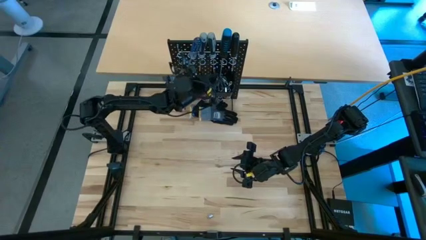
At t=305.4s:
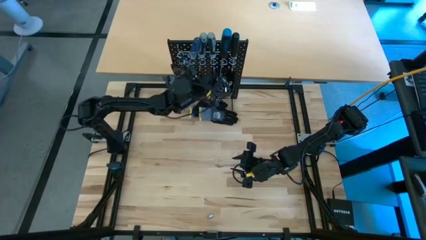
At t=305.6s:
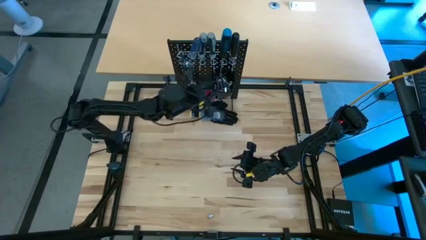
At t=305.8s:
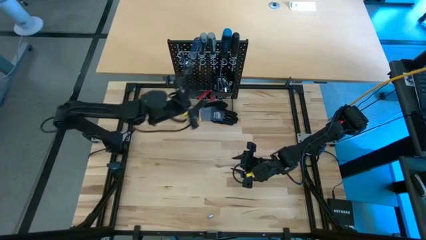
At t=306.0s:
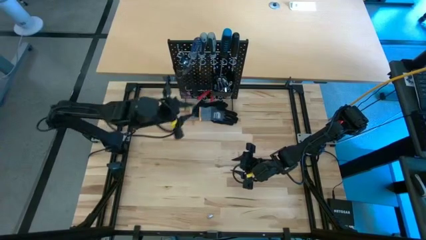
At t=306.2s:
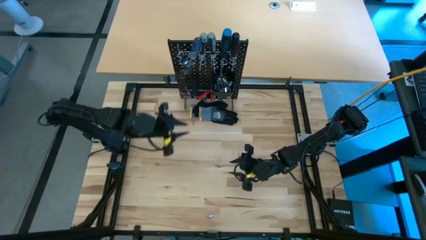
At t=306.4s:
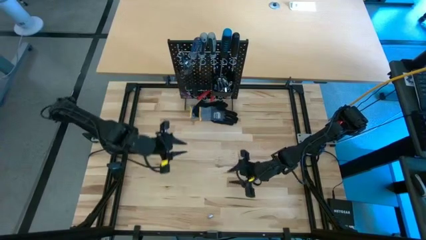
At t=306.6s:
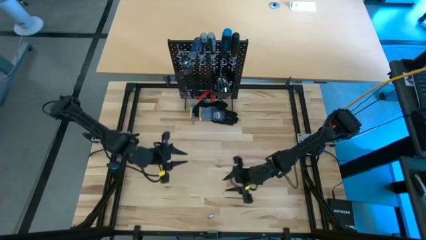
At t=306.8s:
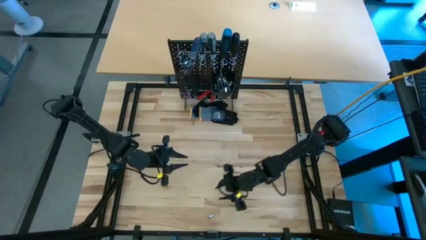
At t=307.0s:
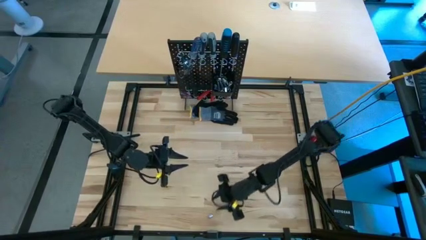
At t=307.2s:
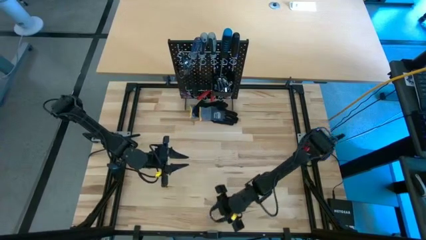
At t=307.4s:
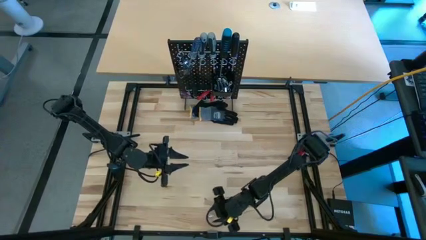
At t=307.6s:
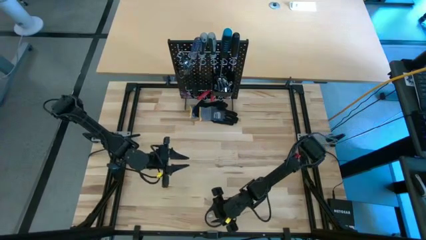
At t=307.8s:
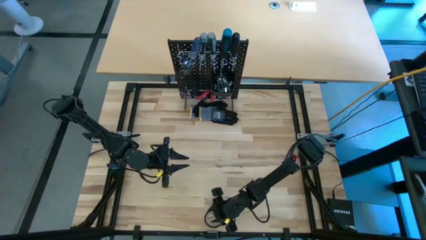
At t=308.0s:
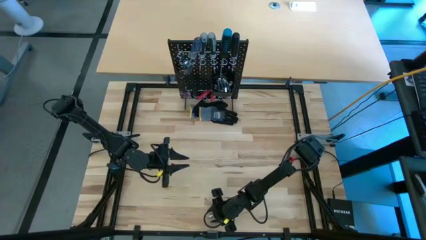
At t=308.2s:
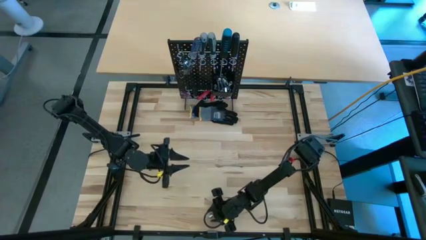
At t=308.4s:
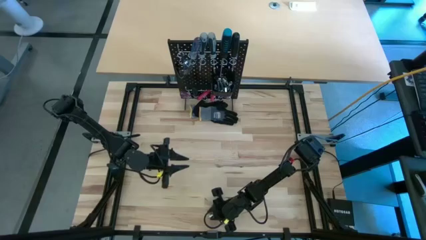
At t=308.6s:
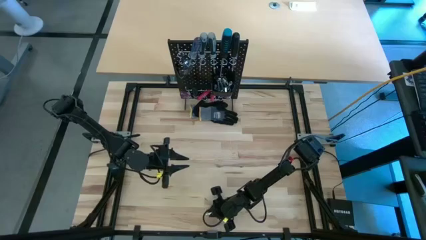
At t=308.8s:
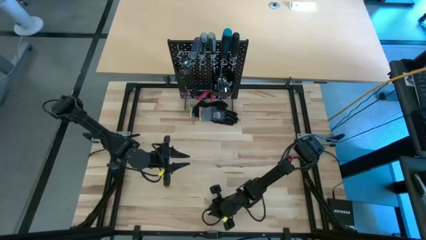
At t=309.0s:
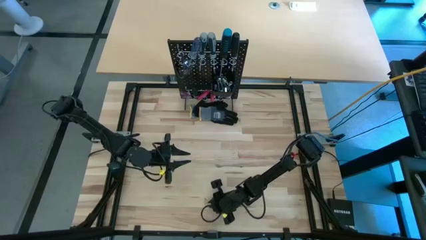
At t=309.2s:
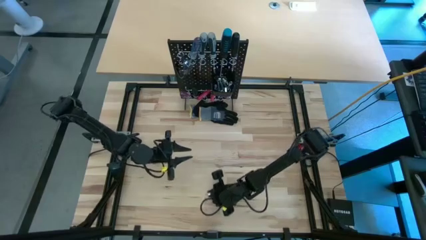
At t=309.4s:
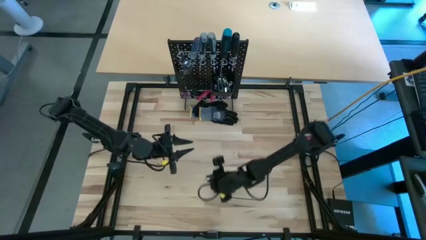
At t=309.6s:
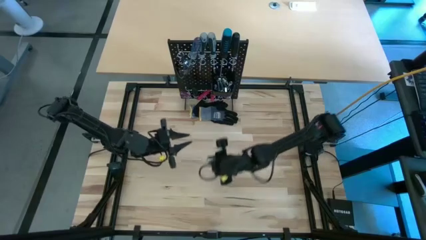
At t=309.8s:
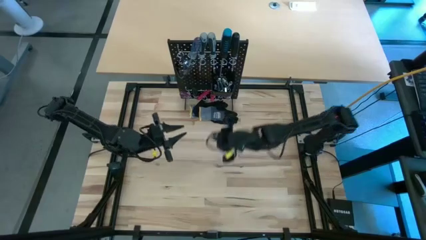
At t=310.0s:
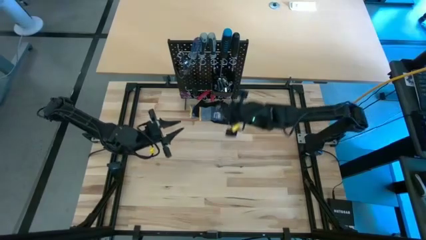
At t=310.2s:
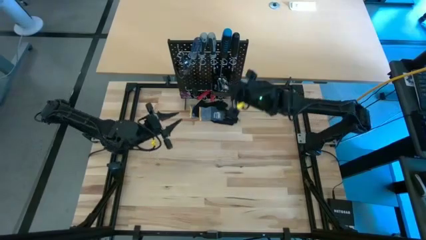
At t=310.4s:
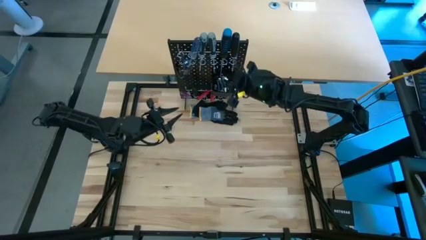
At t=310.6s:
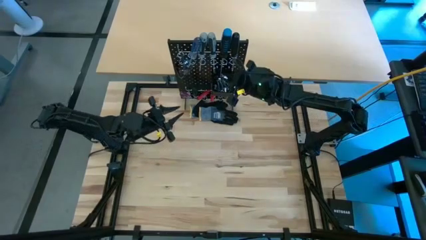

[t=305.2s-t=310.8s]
Task: Hang tools onto peg board
Put the socket into the pegboard bin

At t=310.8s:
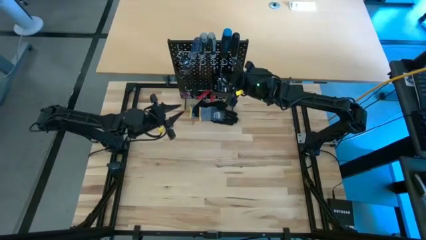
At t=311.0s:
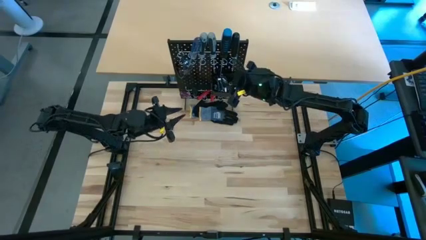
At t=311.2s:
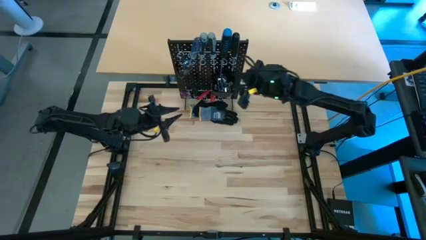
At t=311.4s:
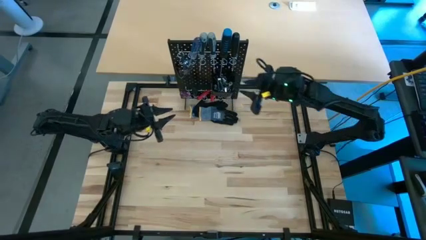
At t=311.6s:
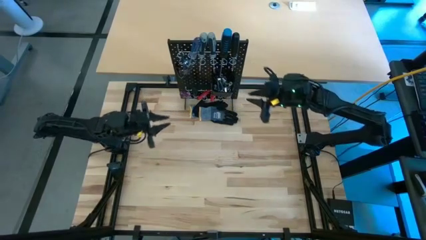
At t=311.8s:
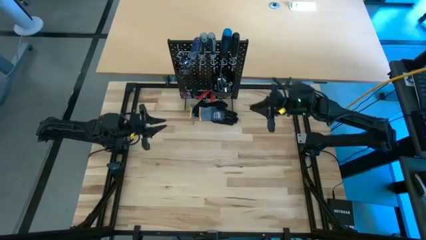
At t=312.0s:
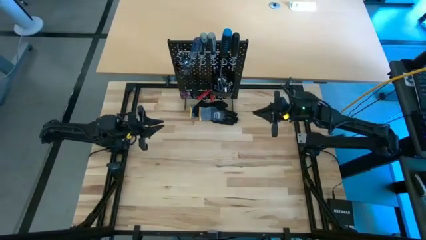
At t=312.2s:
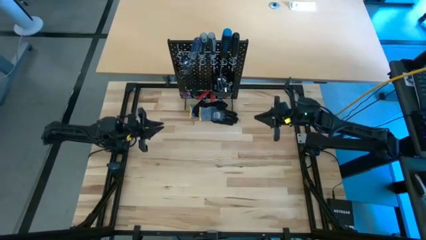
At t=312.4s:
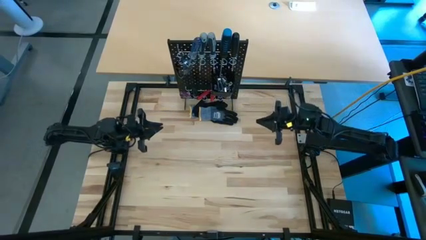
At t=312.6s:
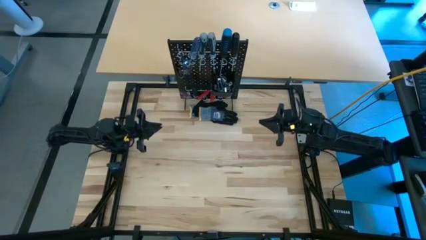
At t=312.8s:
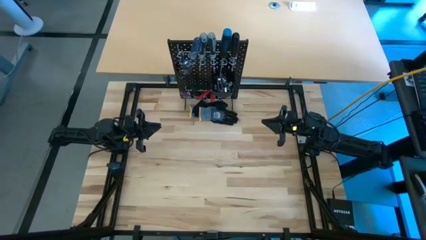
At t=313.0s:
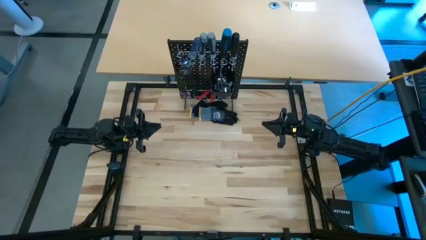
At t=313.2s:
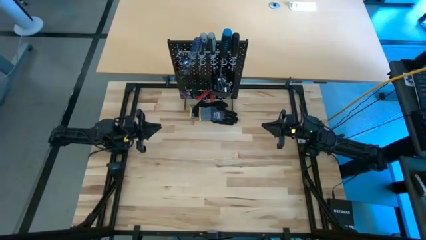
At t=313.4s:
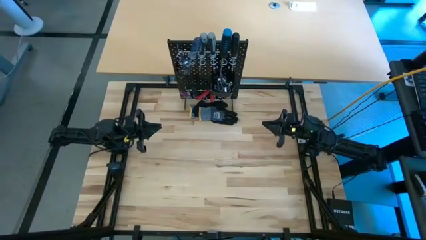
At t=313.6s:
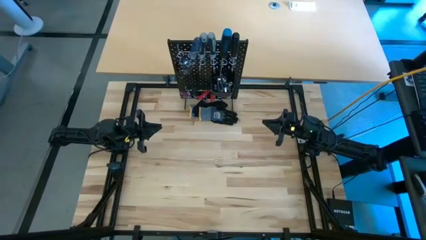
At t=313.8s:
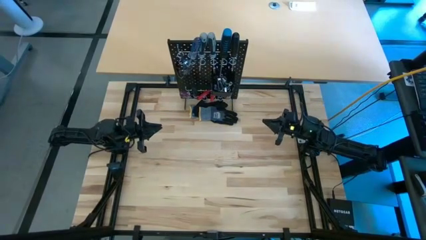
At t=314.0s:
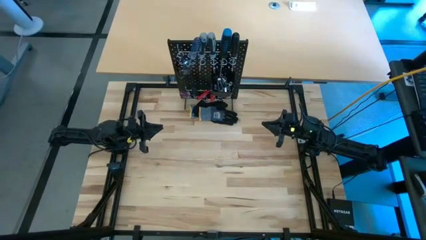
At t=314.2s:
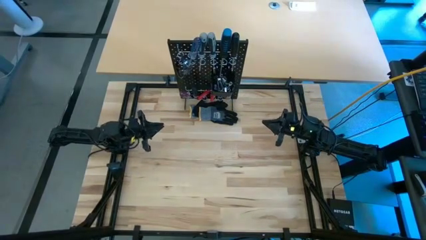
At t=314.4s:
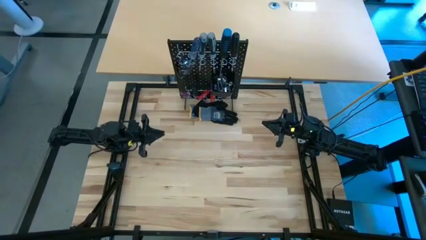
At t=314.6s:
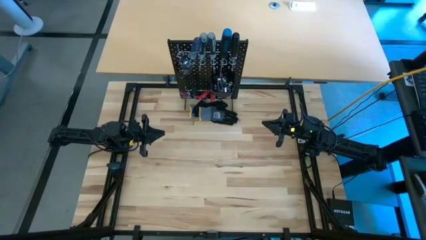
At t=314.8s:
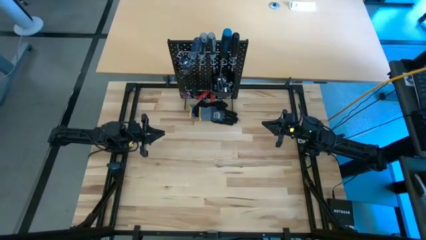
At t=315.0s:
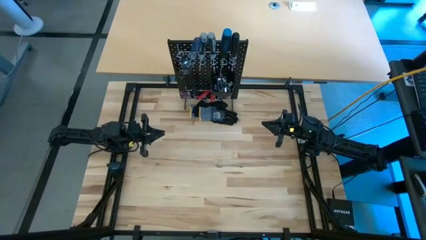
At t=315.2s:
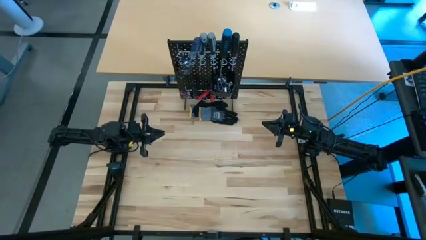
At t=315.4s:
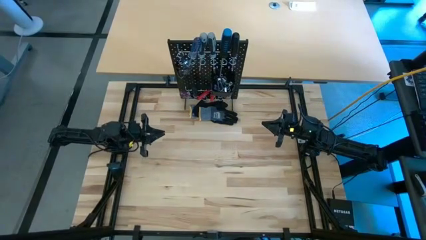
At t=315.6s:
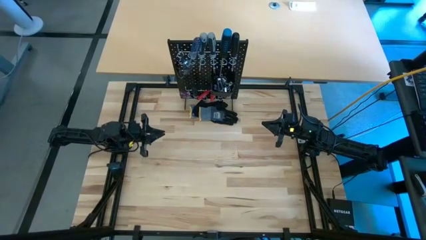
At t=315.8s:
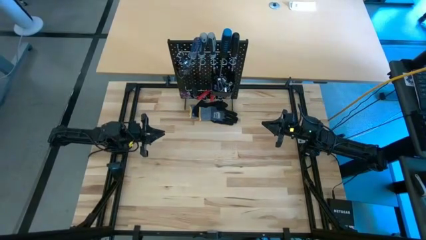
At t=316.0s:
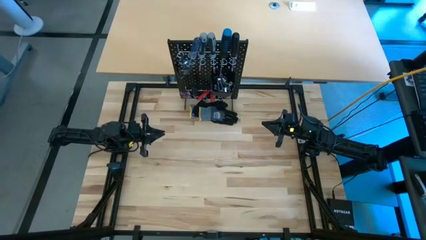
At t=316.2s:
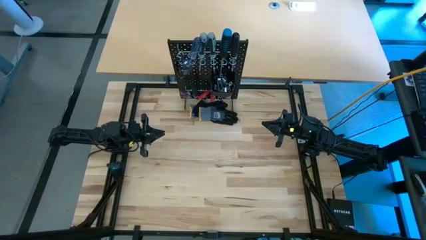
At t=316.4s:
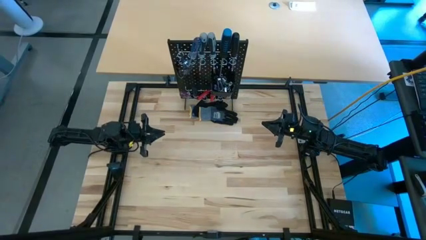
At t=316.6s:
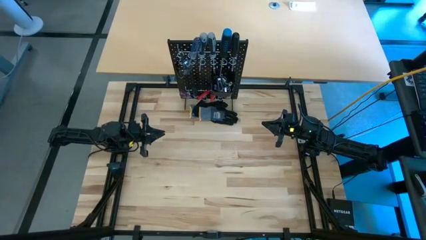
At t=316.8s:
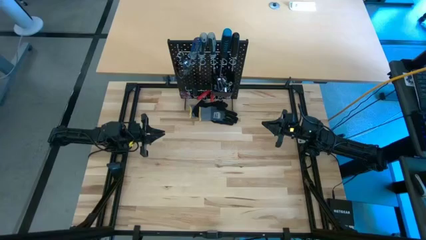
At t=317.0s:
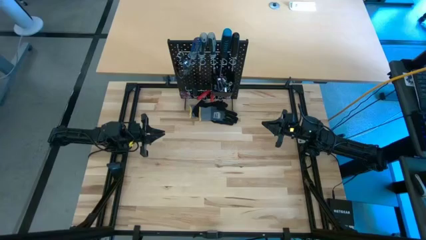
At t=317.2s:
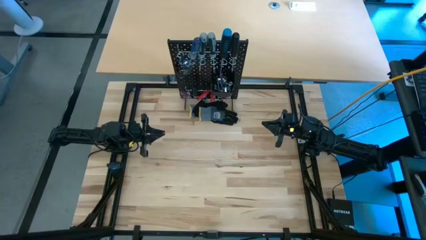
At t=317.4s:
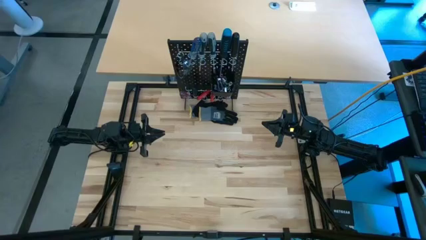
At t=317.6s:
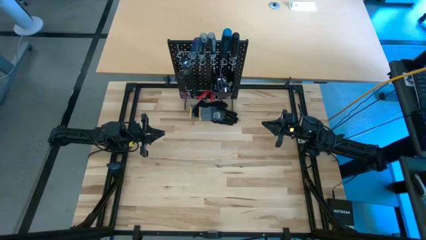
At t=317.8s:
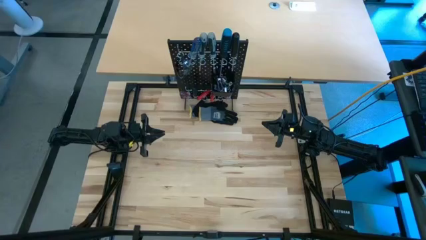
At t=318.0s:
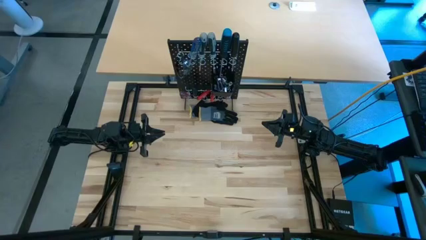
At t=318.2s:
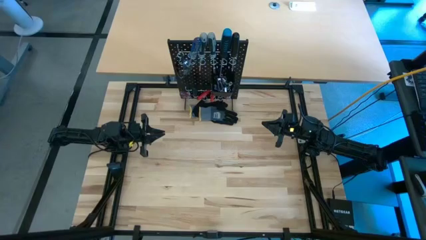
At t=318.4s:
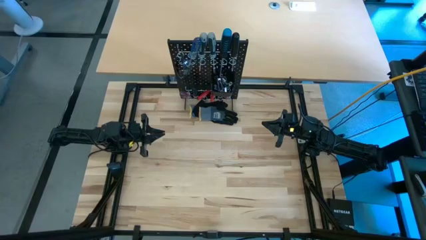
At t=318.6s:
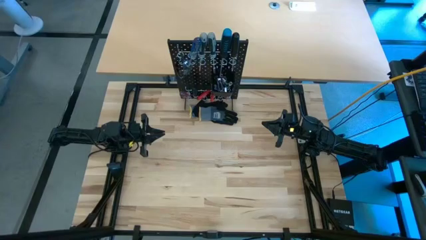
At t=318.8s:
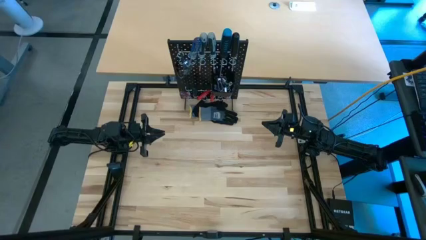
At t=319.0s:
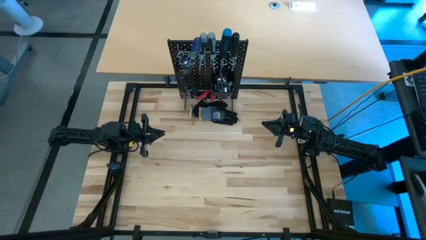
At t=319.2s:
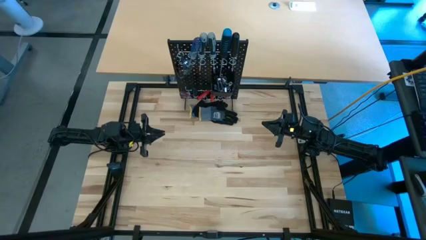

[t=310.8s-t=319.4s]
Return to Home Position

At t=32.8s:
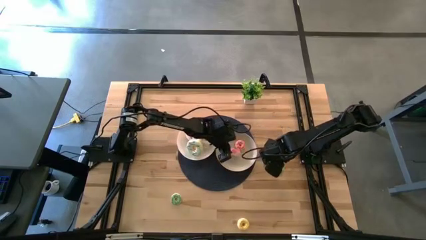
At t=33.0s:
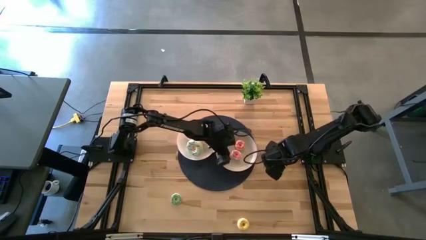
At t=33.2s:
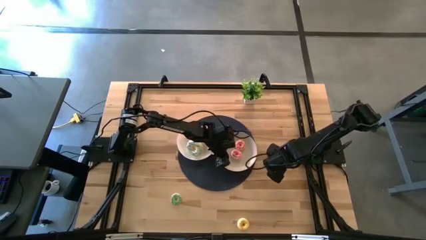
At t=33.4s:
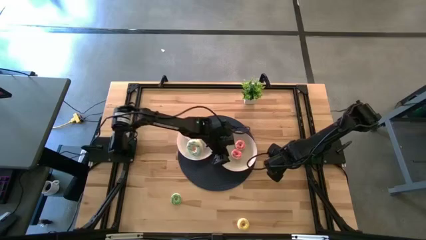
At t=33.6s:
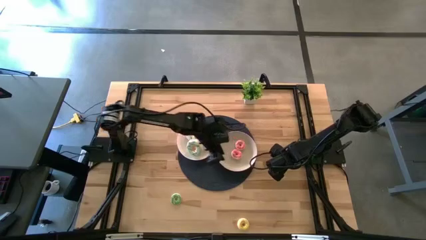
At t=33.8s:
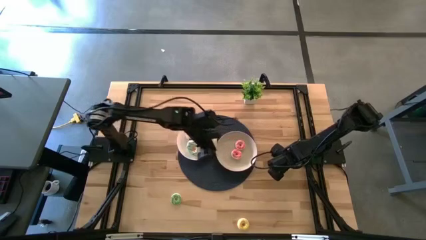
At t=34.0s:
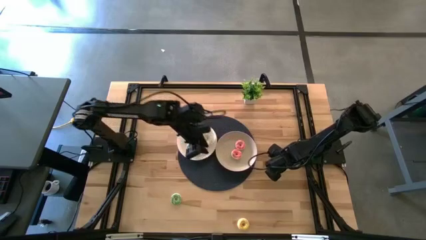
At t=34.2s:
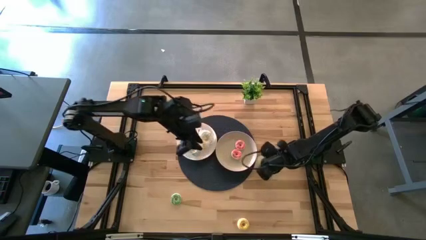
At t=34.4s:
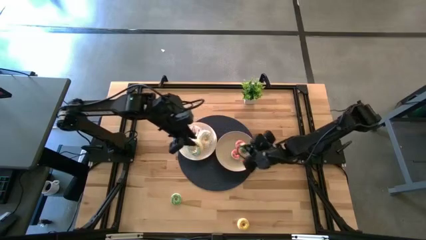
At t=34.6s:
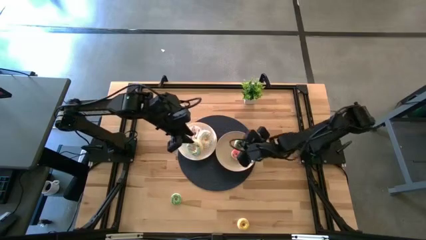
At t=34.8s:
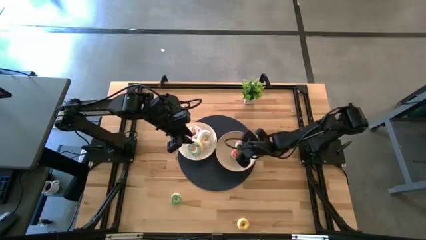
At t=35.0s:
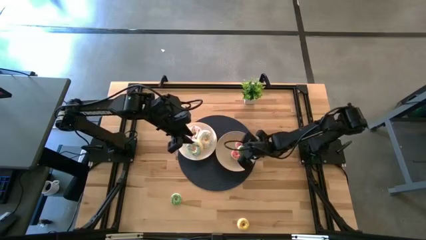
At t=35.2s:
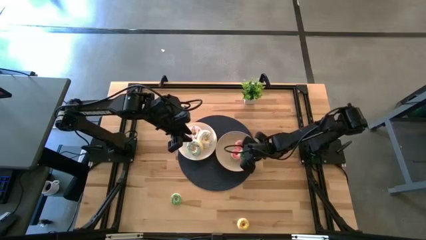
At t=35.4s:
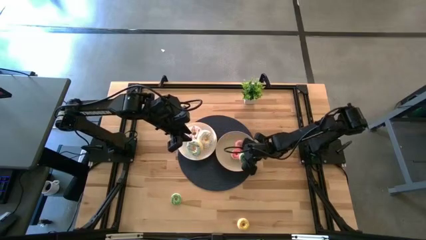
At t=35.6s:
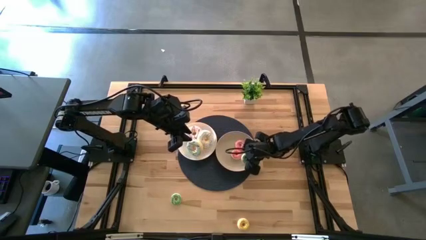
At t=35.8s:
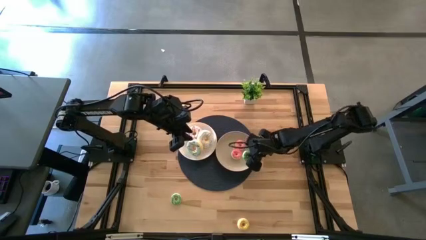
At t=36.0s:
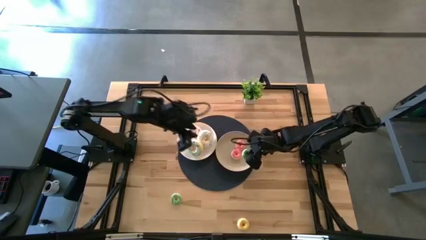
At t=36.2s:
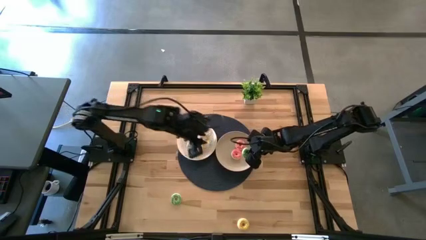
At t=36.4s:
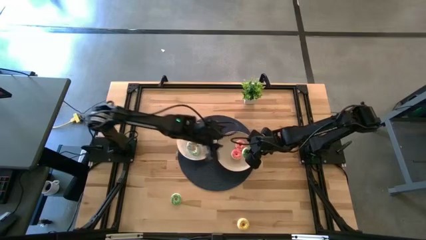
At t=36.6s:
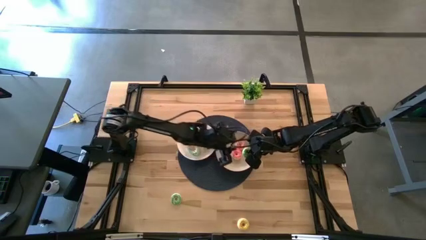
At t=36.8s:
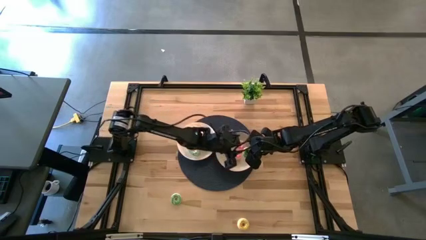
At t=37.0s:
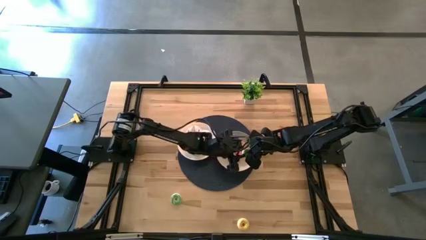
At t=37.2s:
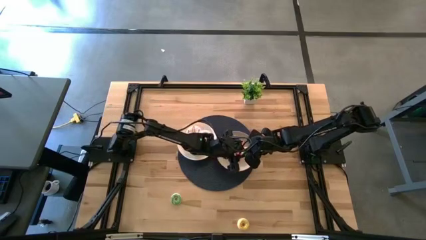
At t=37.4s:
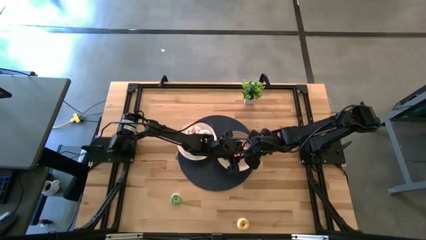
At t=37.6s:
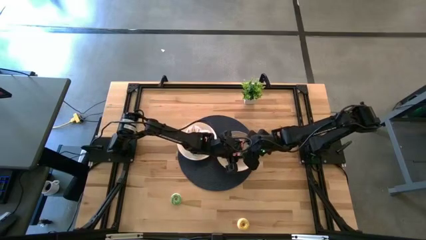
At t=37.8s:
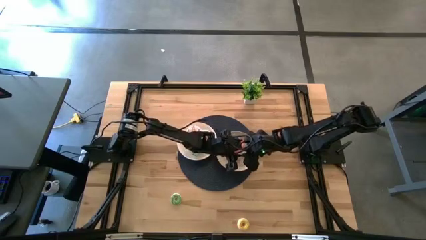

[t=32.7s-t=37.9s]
Task: Pick & Place donuts
Put the right small green donut on the light brown plate
